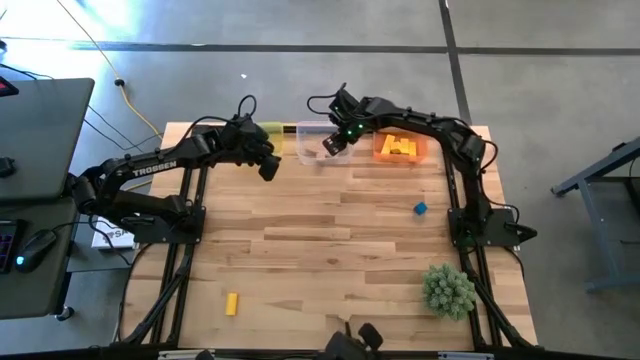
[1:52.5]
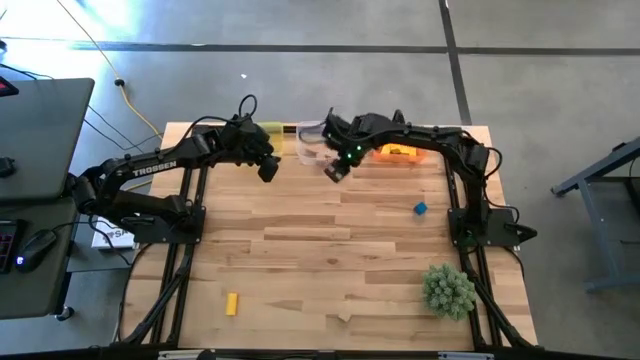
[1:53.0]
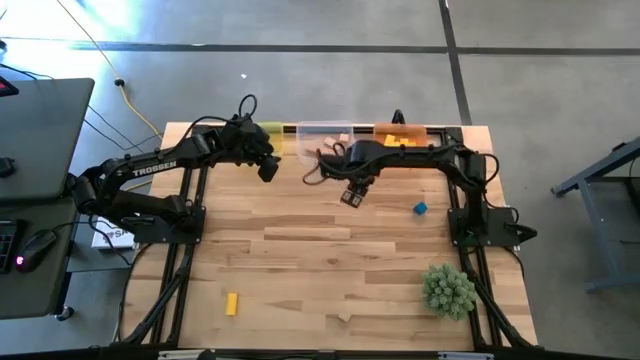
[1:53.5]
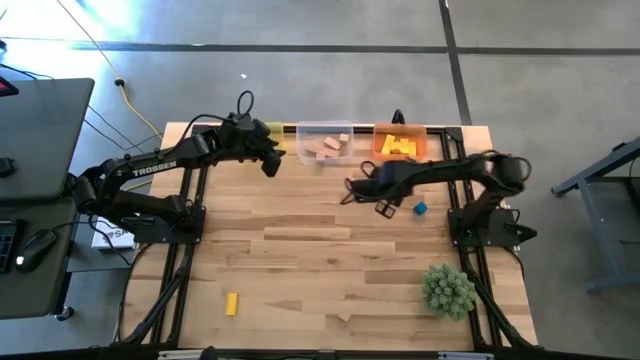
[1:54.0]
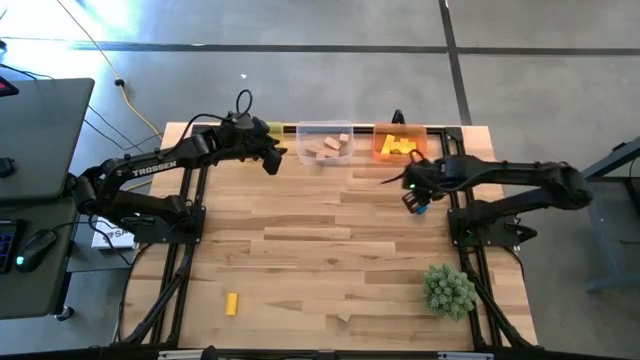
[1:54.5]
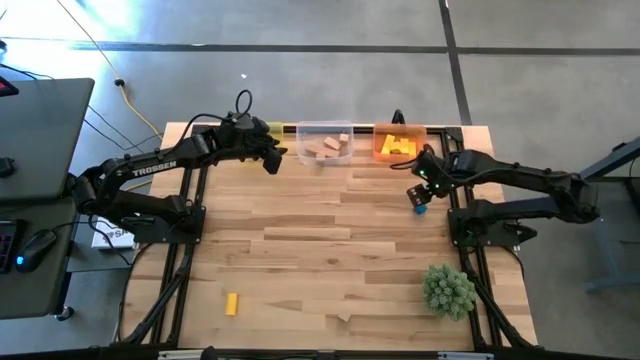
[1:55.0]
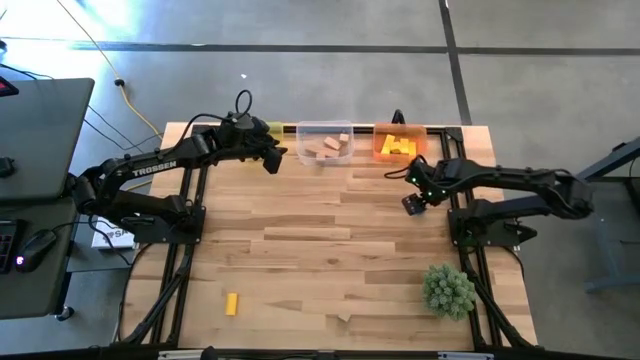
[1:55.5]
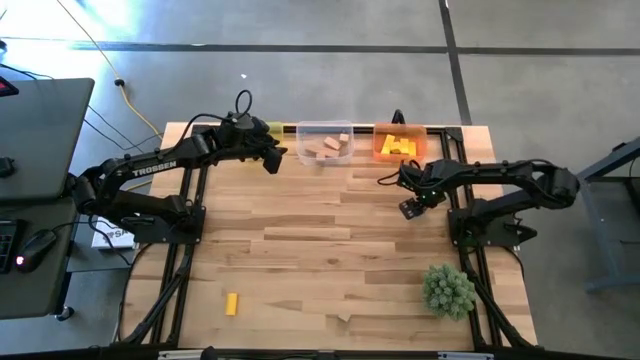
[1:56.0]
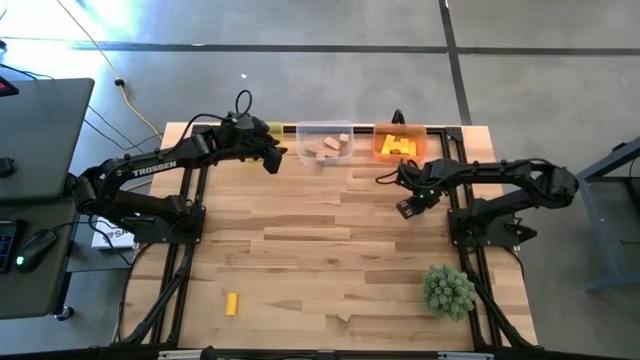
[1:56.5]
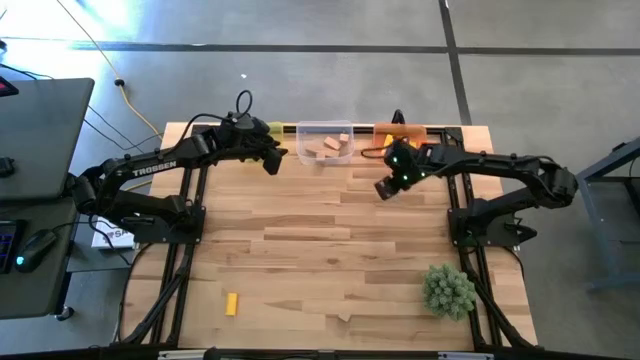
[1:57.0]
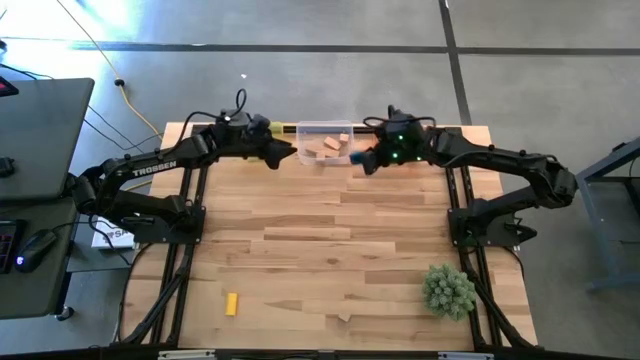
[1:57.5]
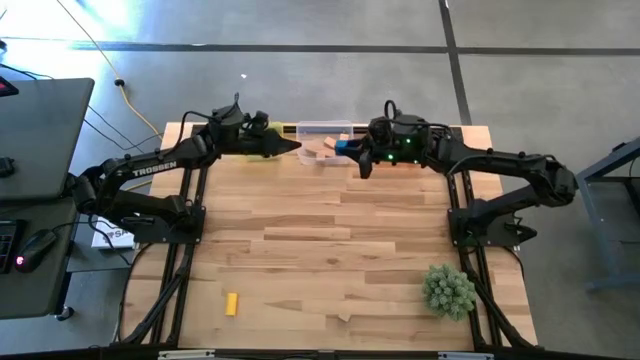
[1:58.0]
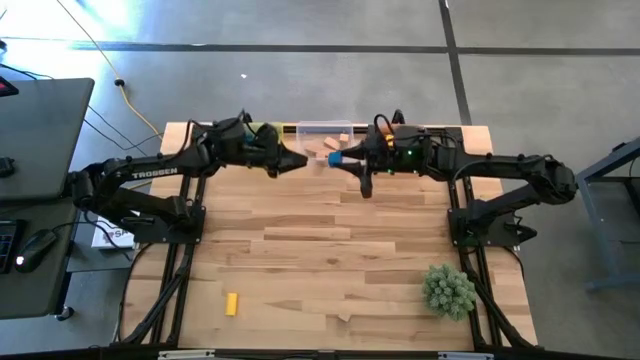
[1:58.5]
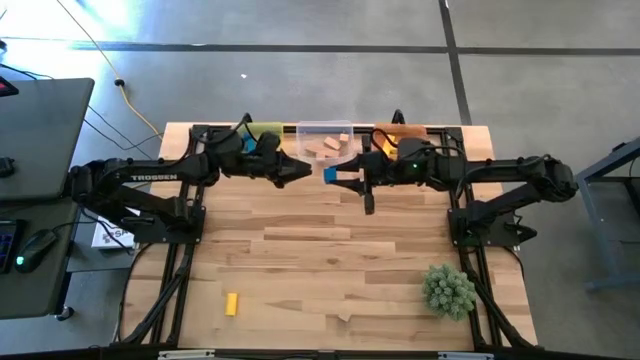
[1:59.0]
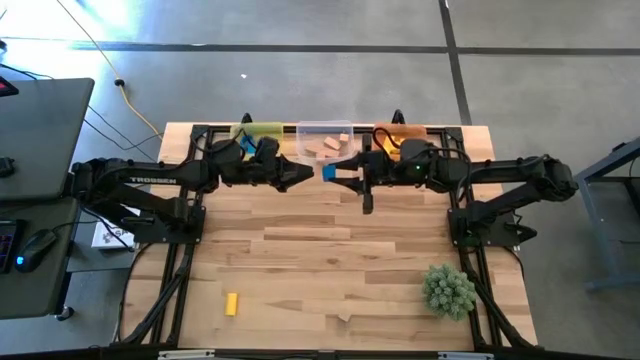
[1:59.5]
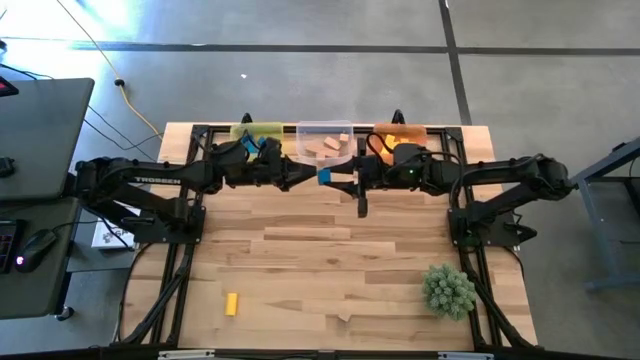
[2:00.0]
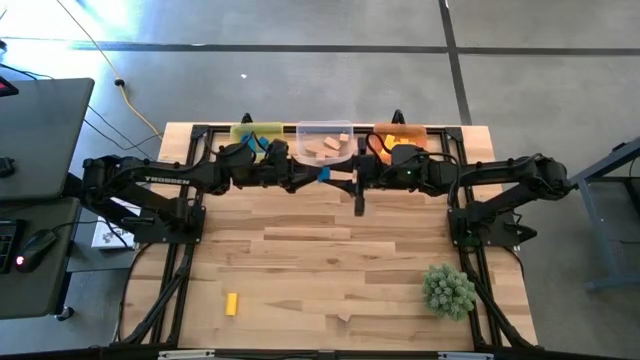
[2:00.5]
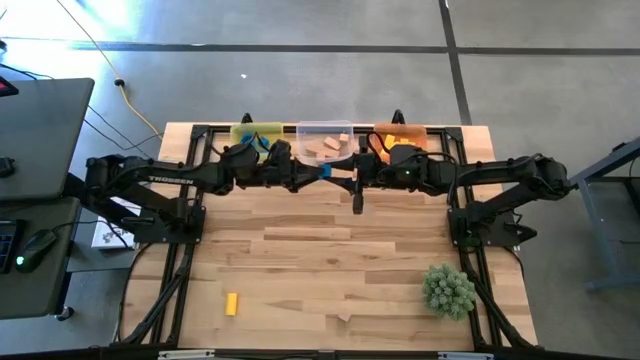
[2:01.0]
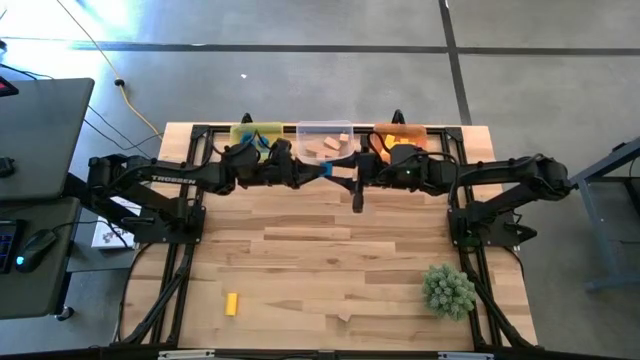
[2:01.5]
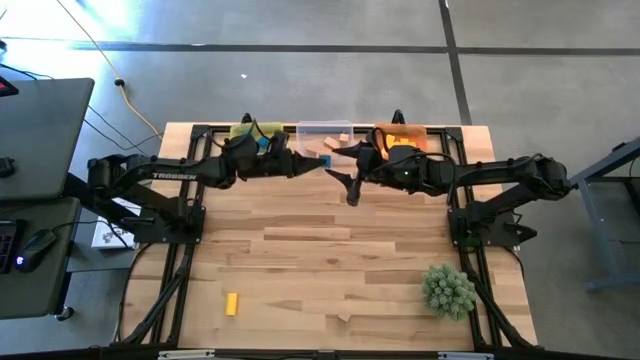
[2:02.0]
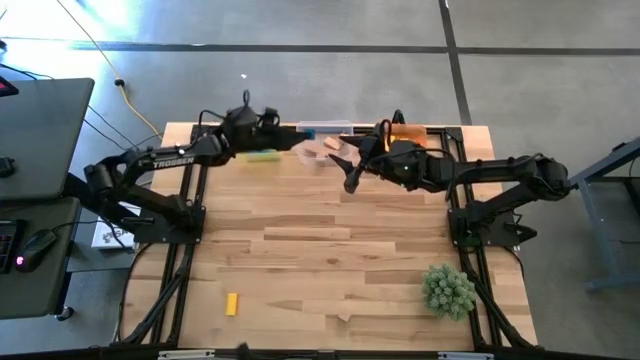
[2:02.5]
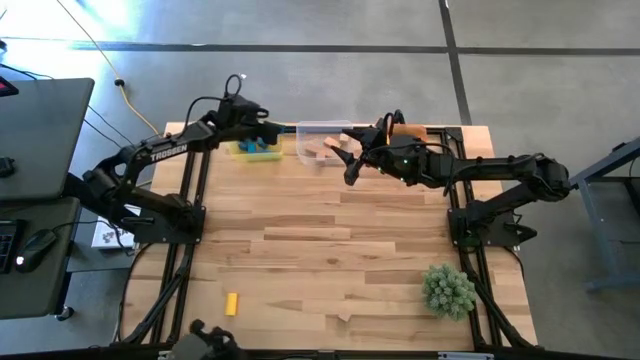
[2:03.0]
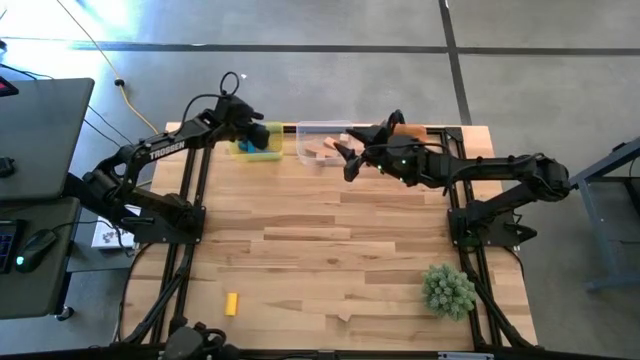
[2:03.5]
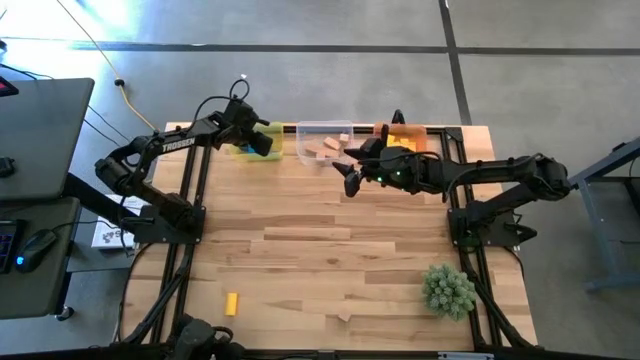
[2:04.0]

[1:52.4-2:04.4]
Task: Sort & place blocks by color
Put the blue block into the yellow bin

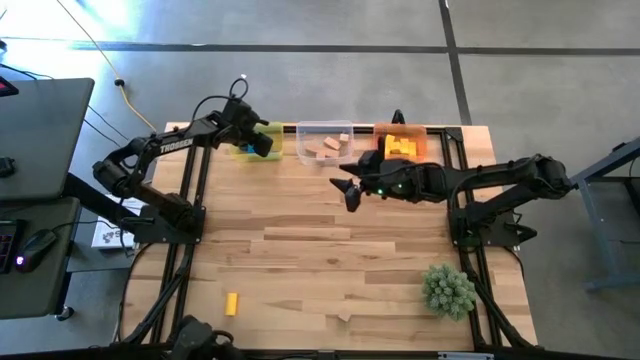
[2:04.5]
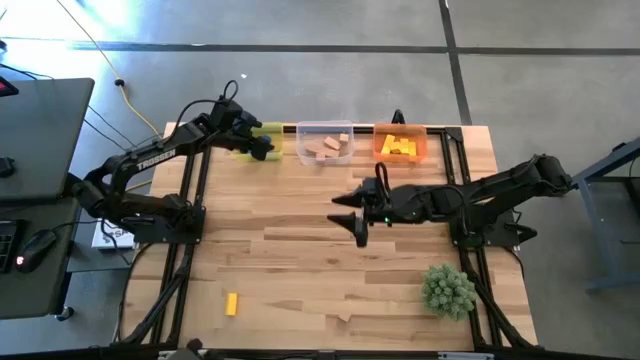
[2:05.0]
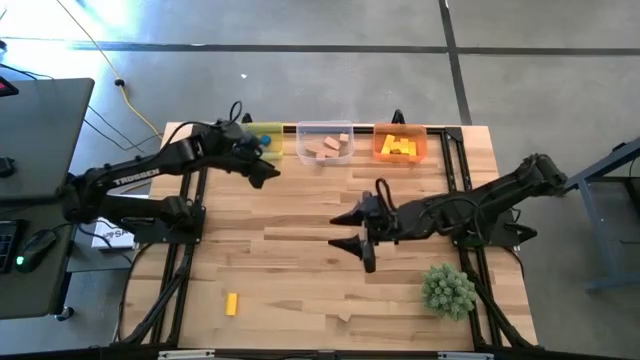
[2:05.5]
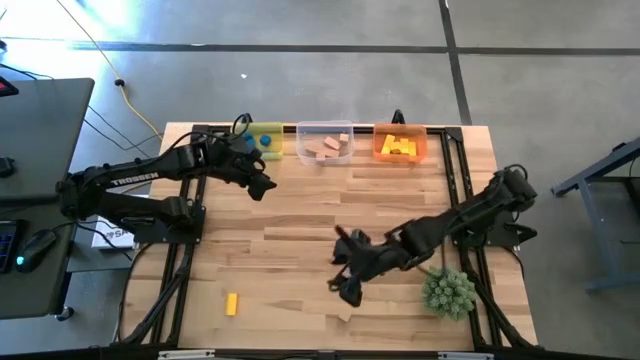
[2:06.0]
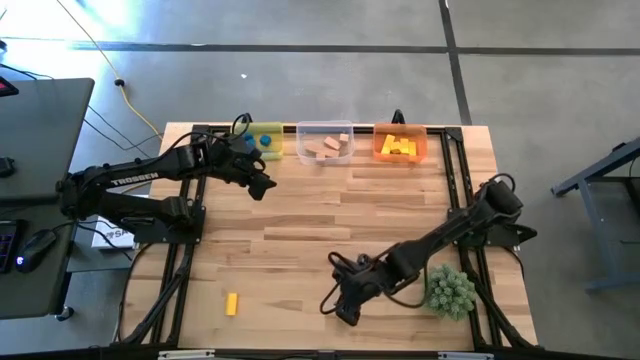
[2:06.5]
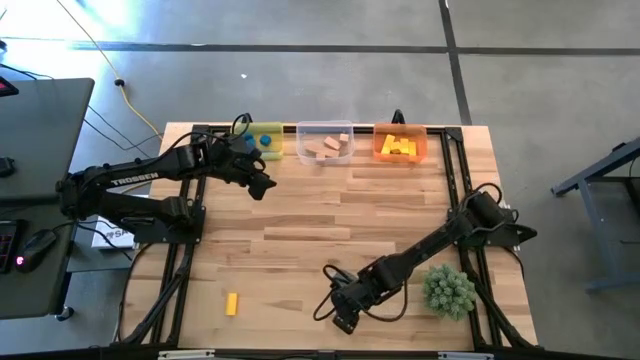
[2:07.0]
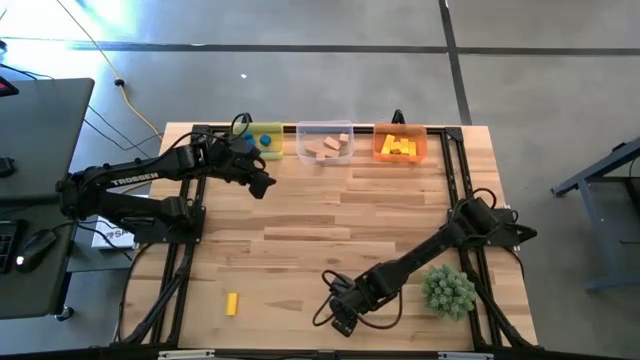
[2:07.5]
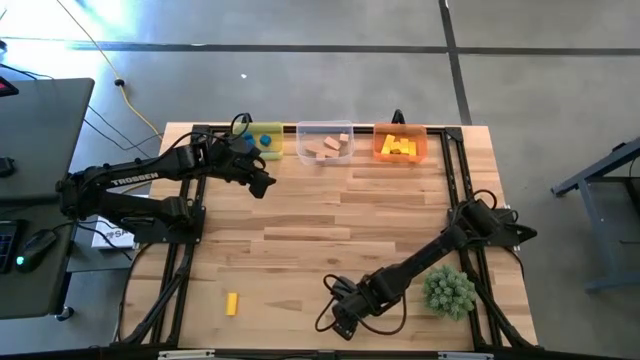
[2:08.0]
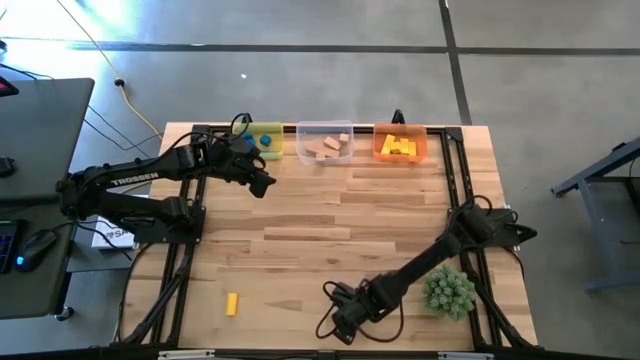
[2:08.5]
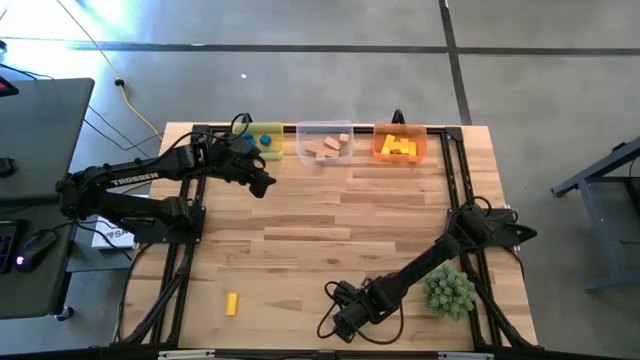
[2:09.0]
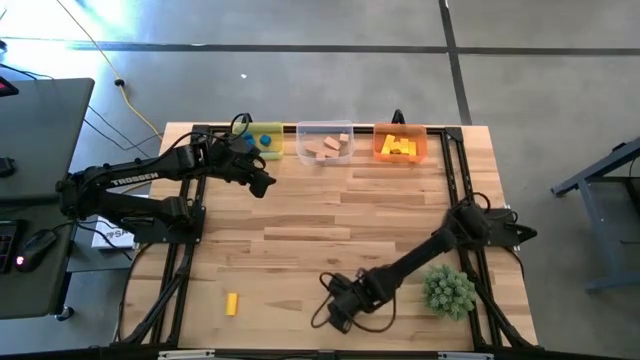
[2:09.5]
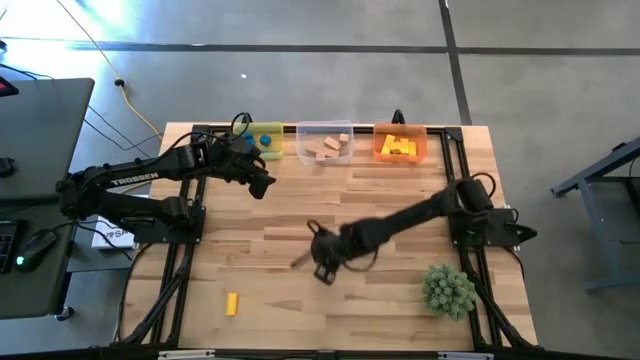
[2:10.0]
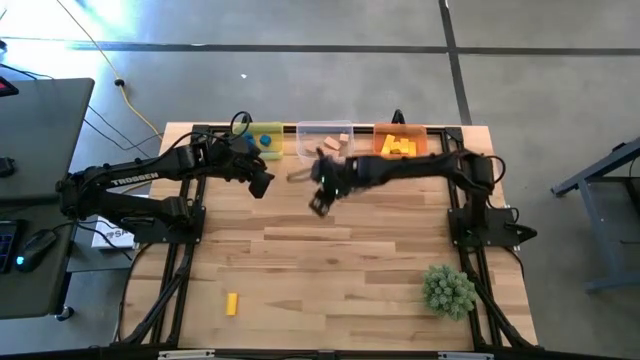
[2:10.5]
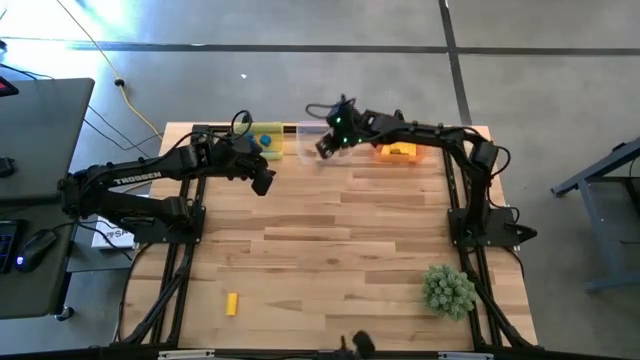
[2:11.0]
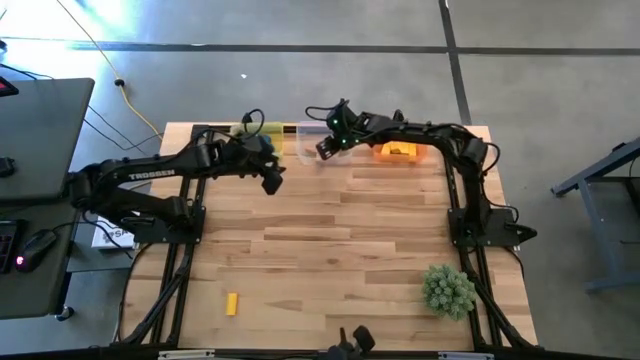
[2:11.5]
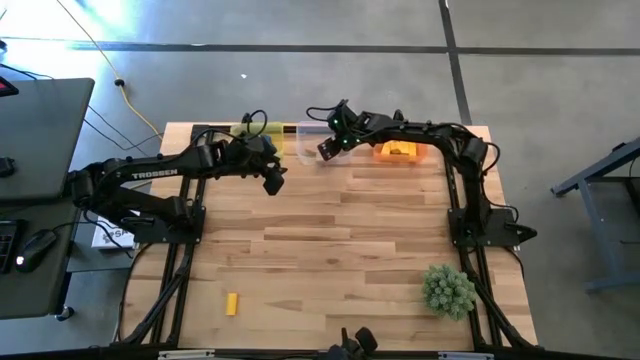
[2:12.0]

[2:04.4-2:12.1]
Put the light brown block into the transparent bin

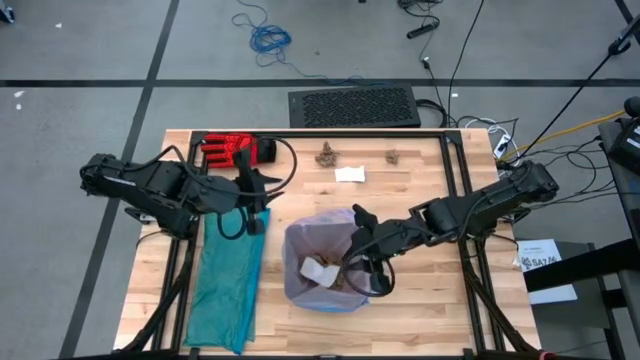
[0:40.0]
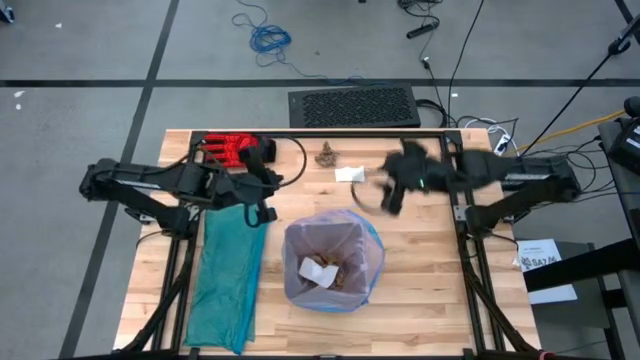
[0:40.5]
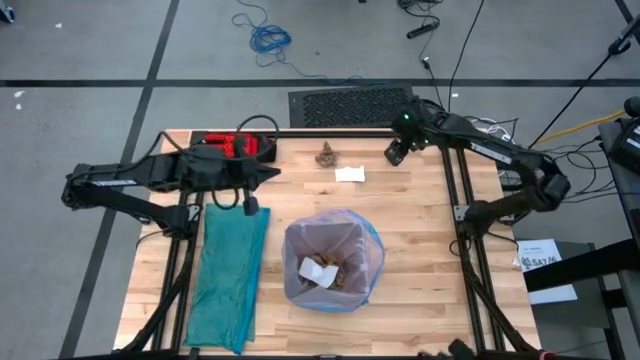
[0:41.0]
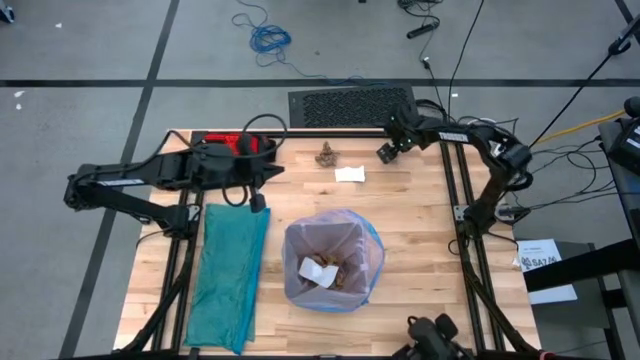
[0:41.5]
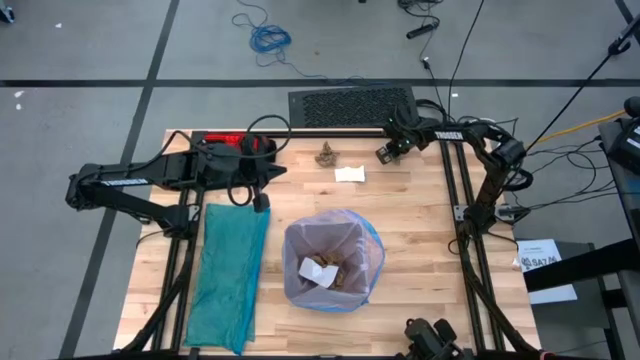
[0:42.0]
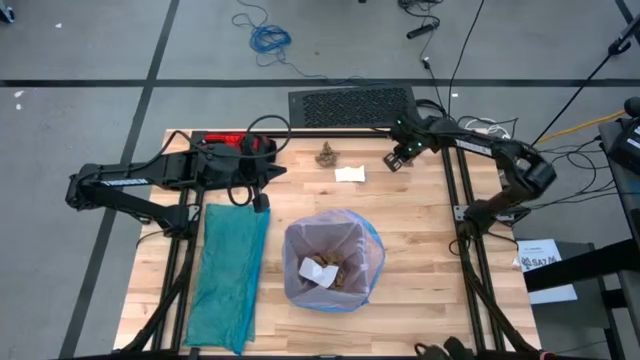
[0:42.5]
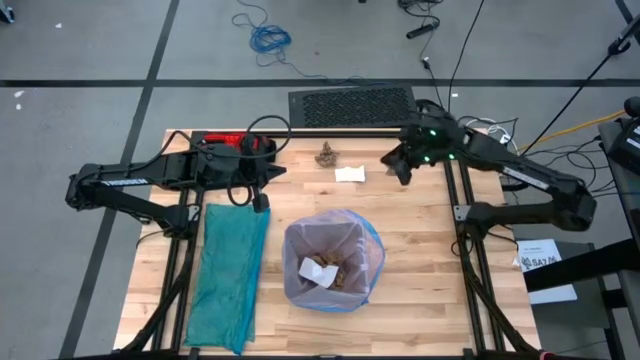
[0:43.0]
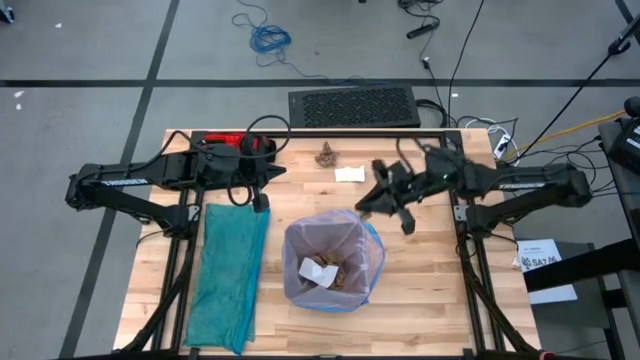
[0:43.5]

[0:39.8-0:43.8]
Task: place trash/remove bag and relplace
Put the brown napkin into the black trash bin
